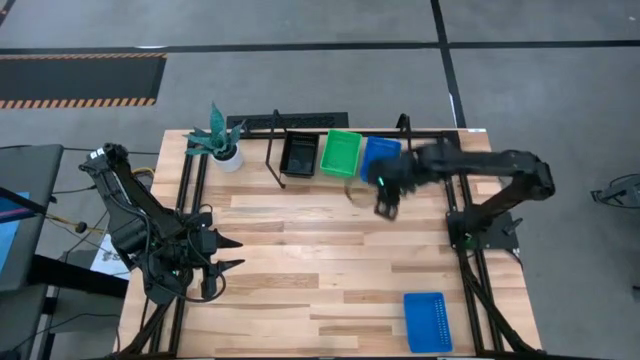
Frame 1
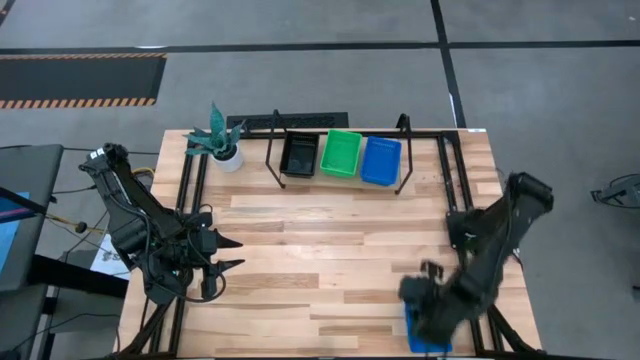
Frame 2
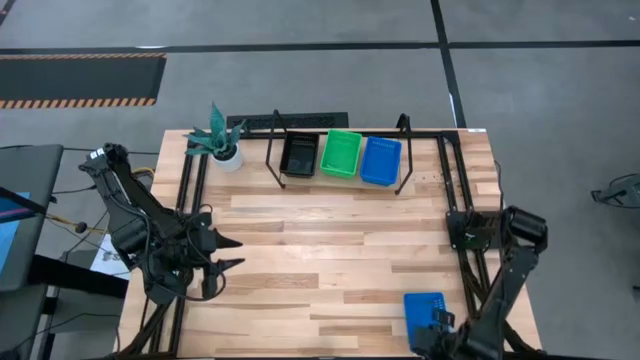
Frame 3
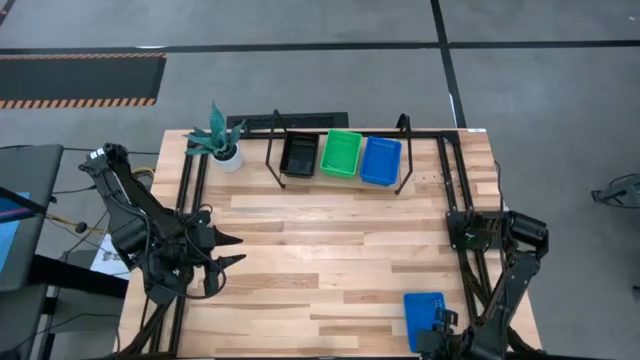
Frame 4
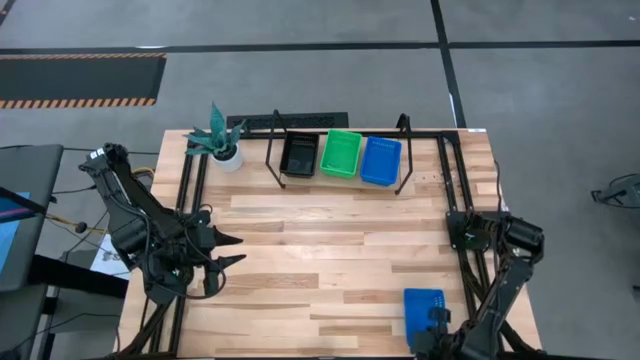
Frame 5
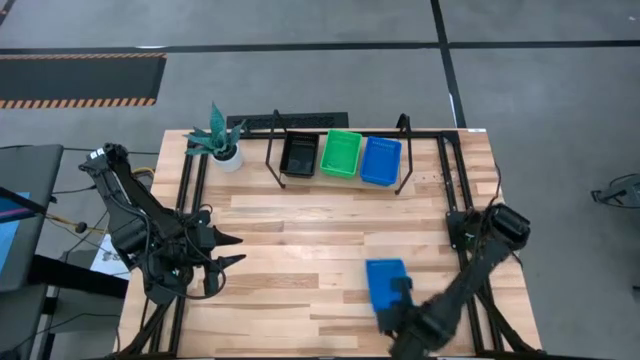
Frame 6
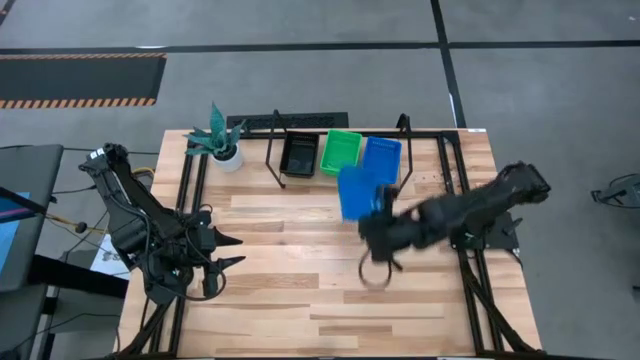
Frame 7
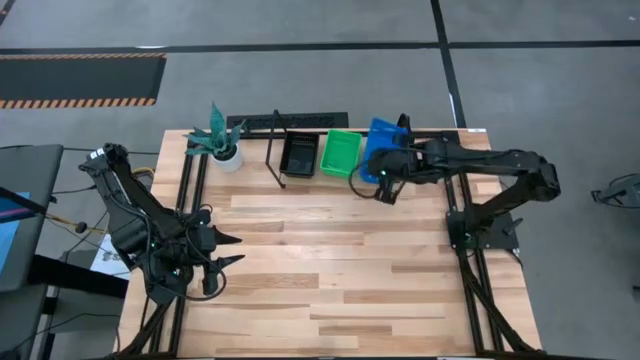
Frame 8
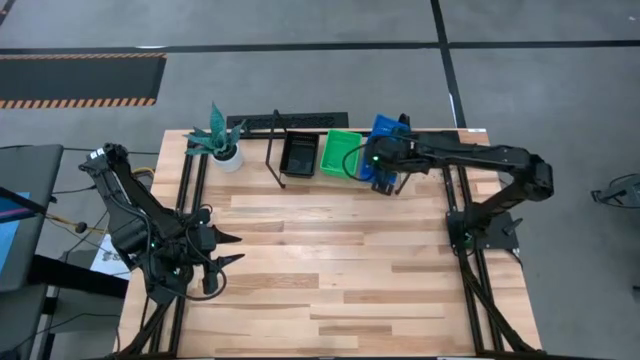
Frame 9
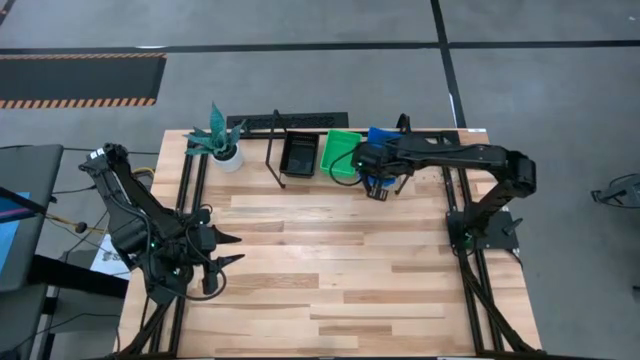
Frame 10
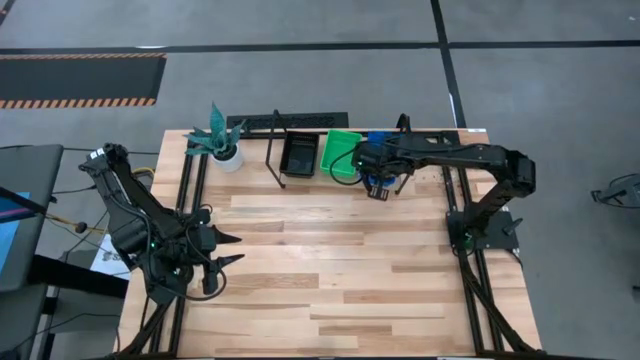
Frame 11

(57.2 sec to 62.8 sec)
Task: Stack baskets on shelf by color
Stack the blue basket on top of the other blue baskets on the shelf

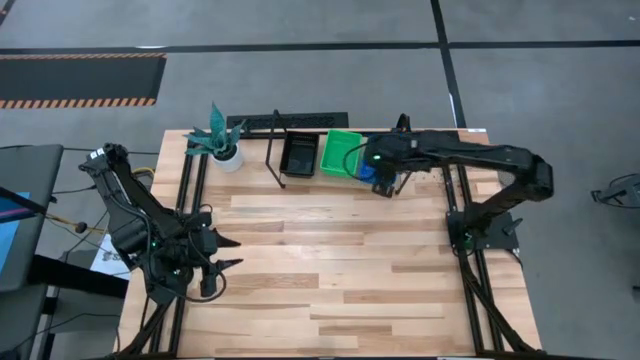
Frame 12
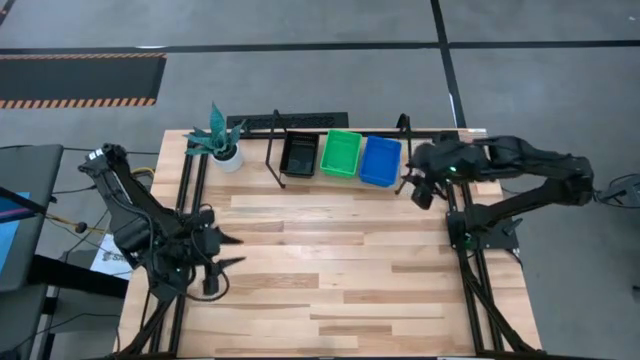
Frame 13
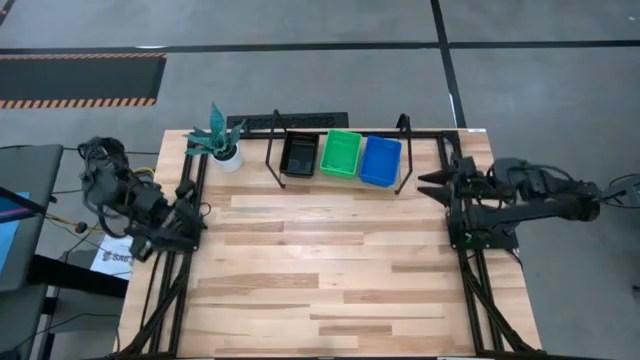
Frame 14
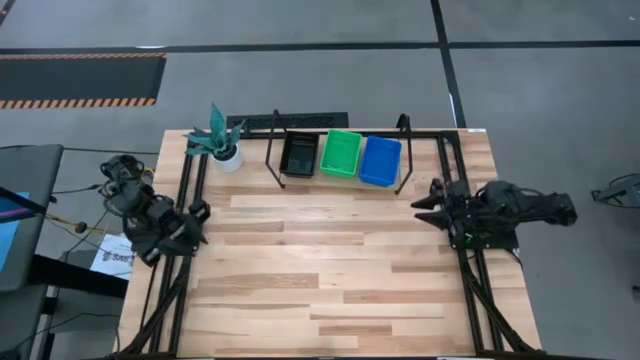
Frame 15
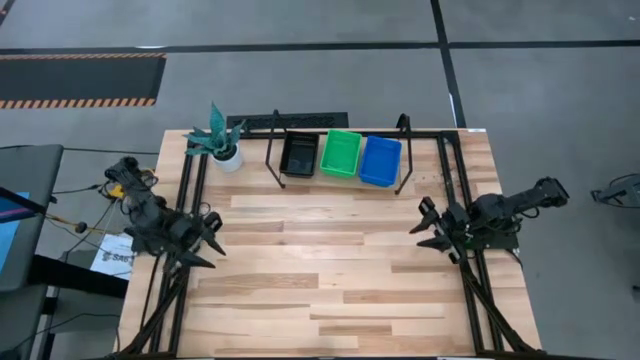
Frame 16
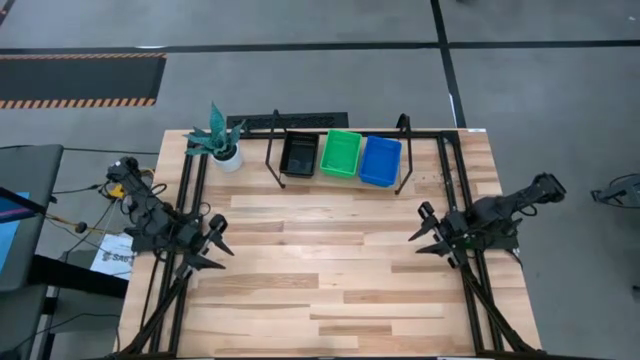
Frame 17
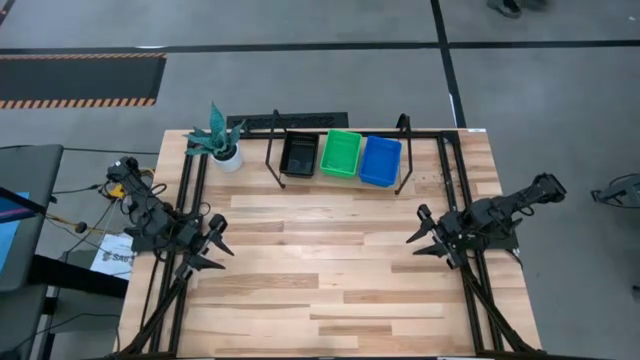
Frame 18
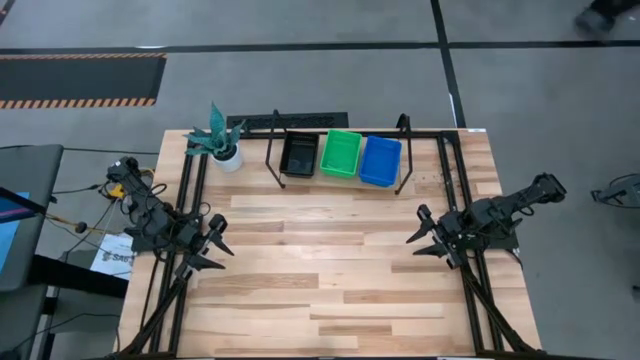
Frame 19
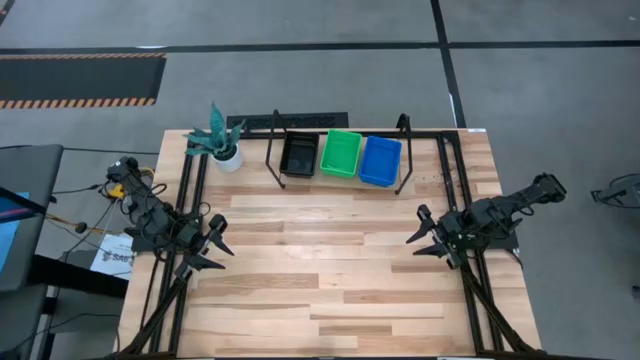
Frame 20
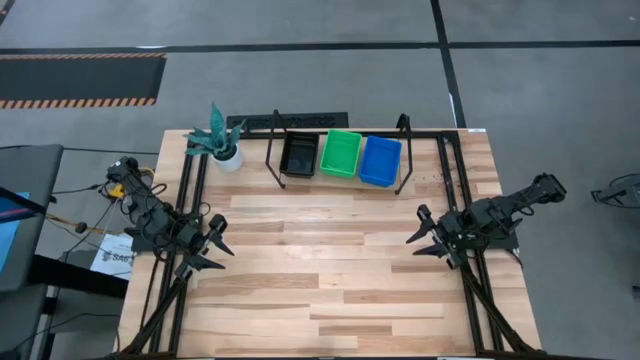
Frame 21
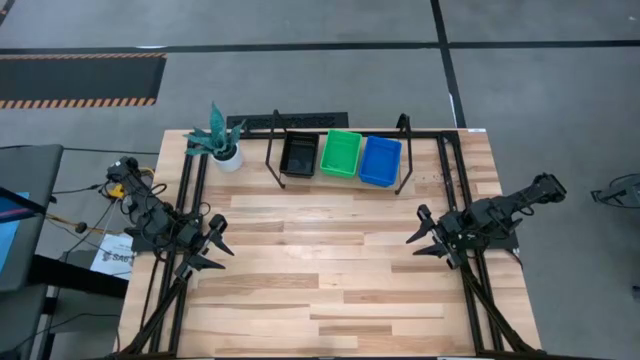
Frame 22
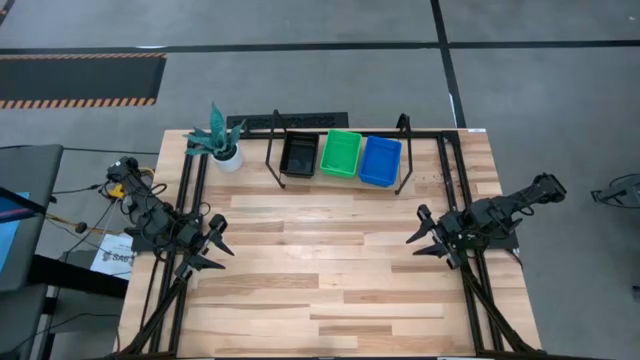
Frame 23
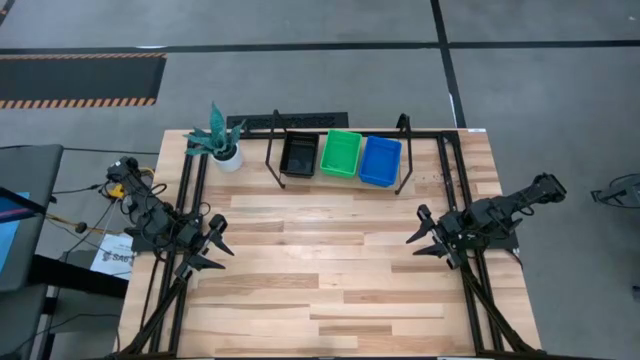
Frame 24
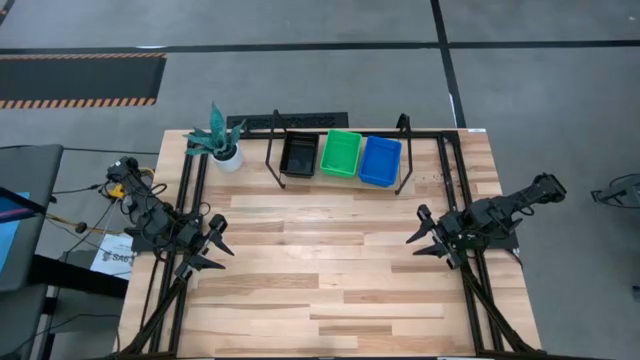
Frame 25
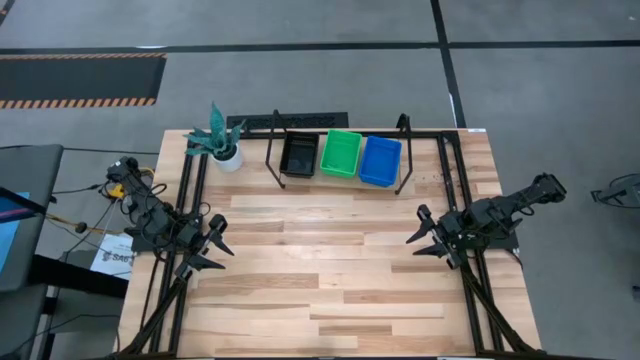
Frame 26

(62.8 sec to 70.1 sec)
Return to Home Position

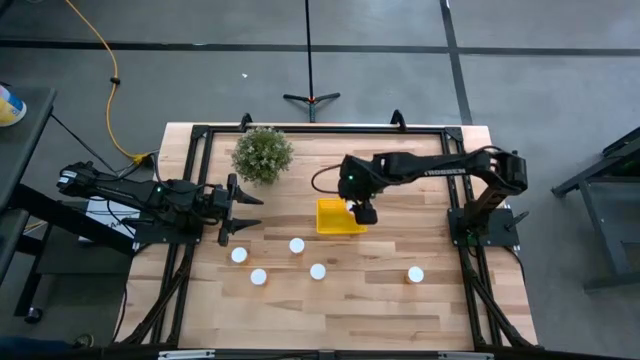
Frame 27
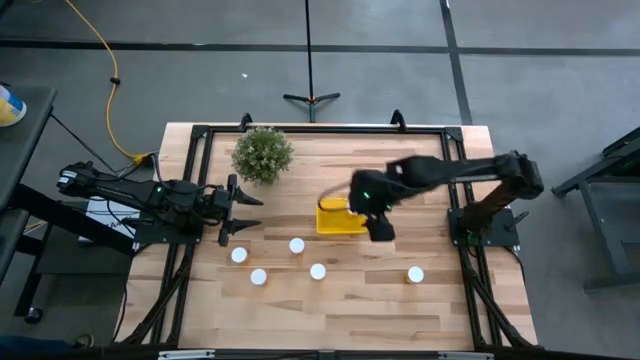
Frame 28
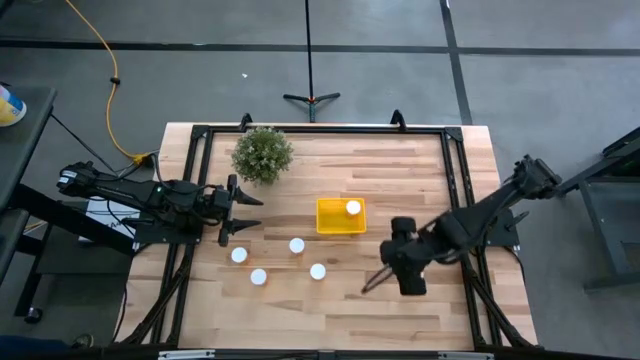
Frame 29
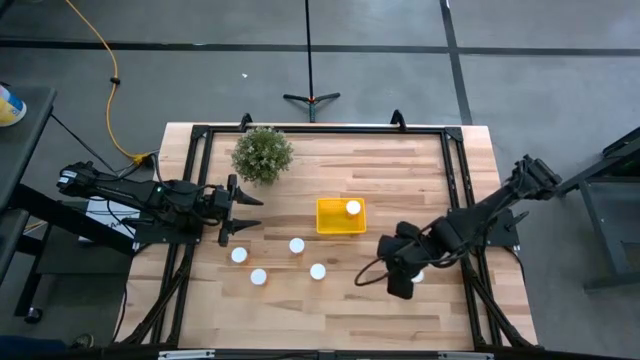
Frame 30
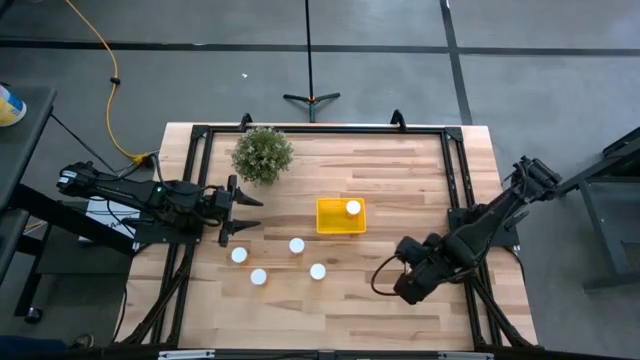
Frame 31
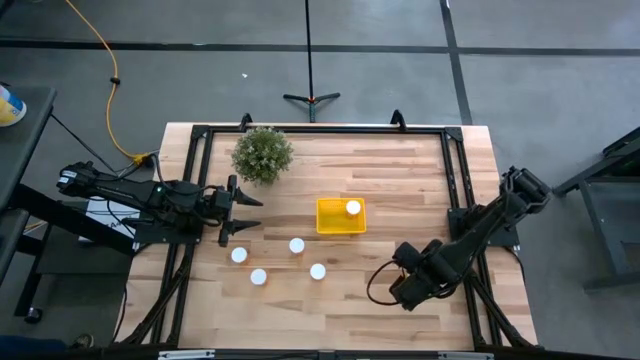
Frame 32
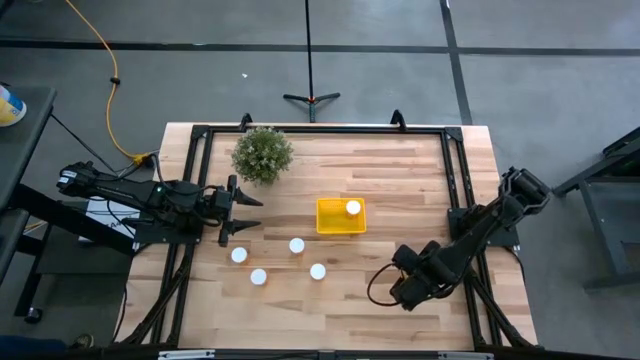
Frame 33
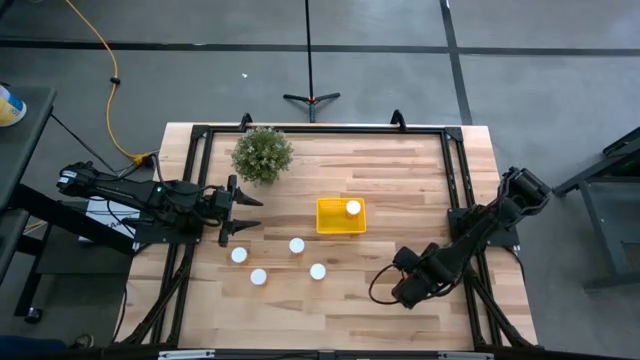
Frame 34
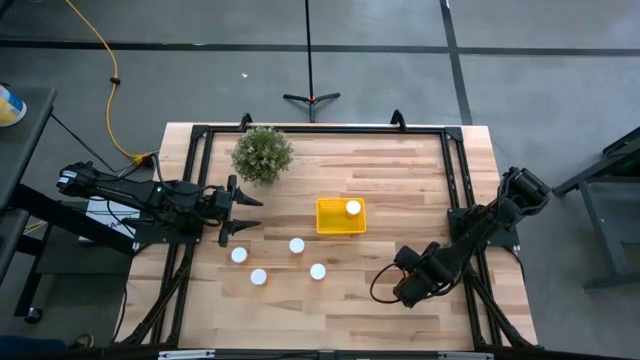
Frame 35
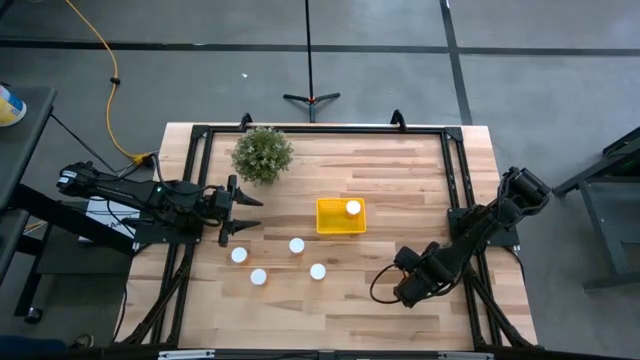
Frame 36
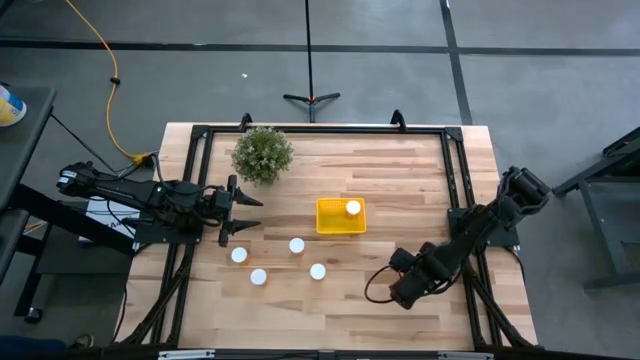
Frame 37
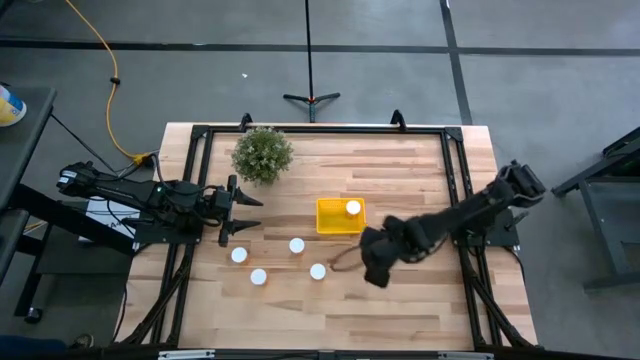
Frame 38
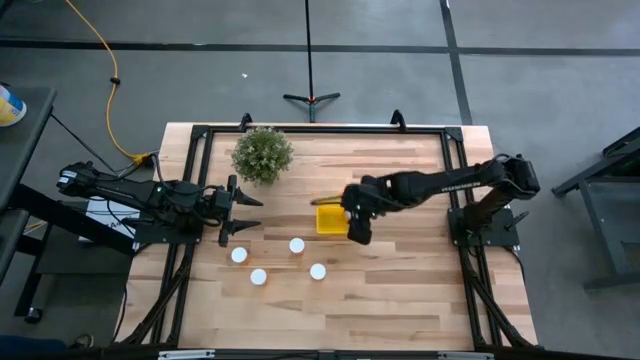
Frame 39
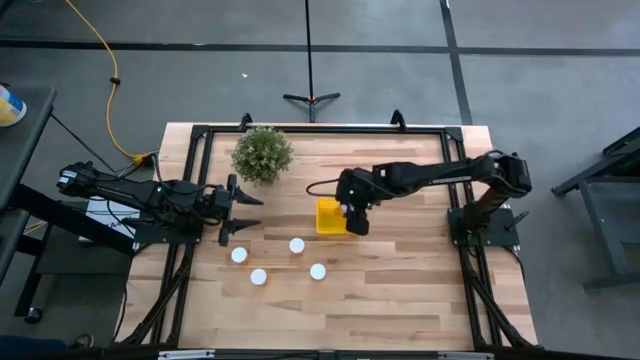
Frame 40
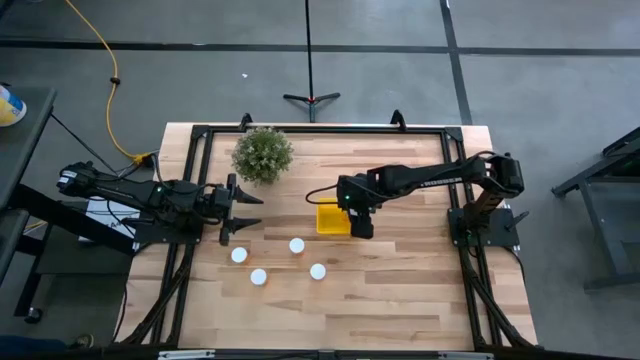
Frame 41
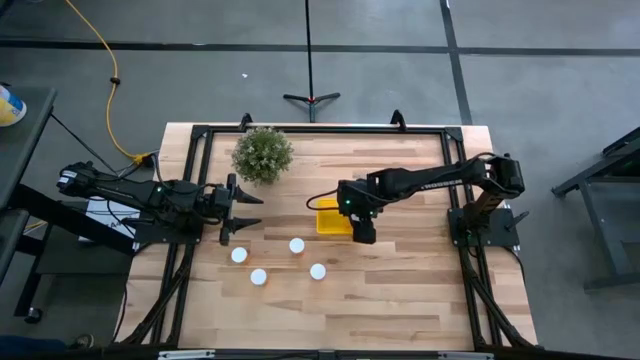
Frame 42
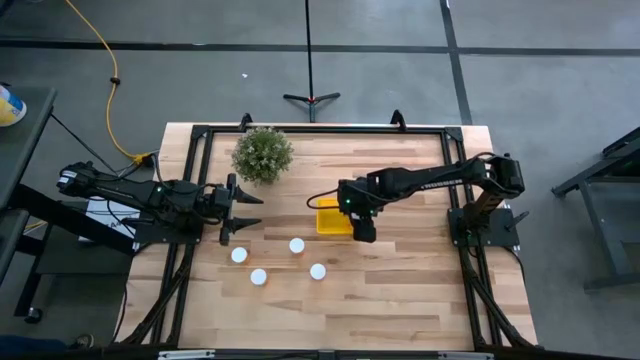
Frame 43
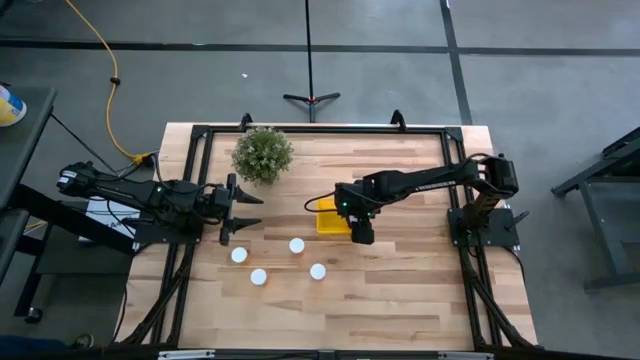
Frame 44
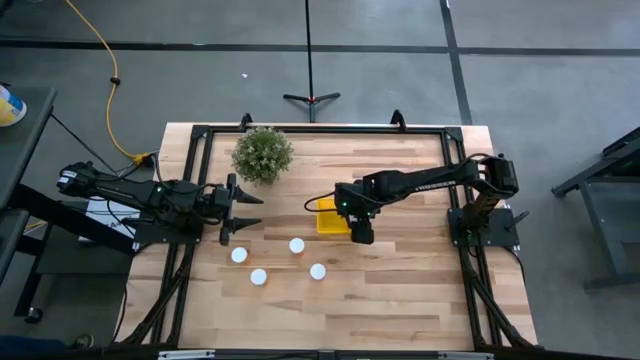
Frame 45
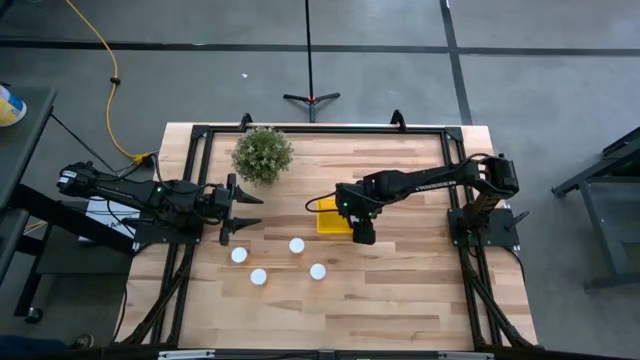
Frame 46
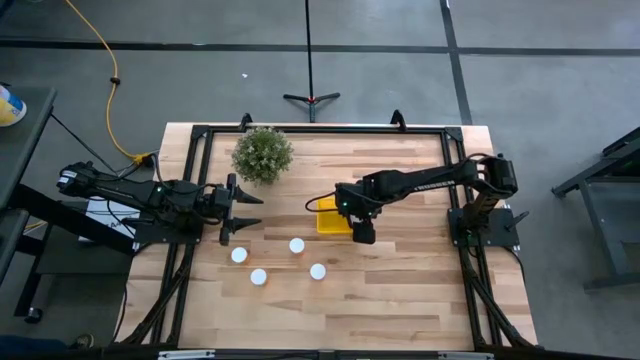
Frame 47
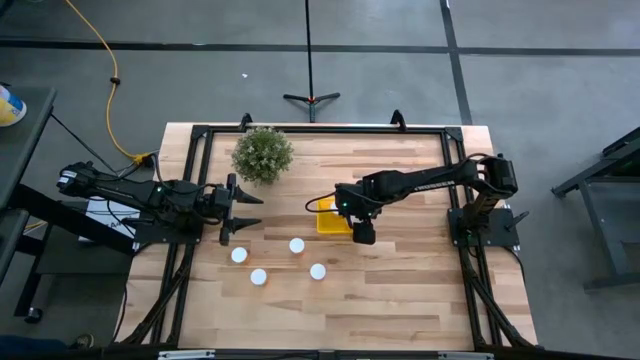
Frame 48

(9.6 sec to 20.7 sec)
Task: Pick and place pill bottles into a basket
Put the orange pill bottle into the bottom right corner of the yellow basket
